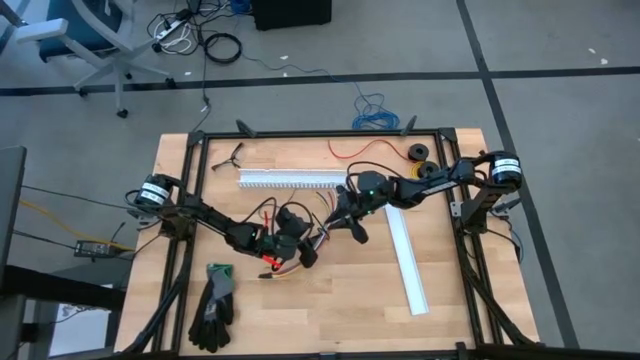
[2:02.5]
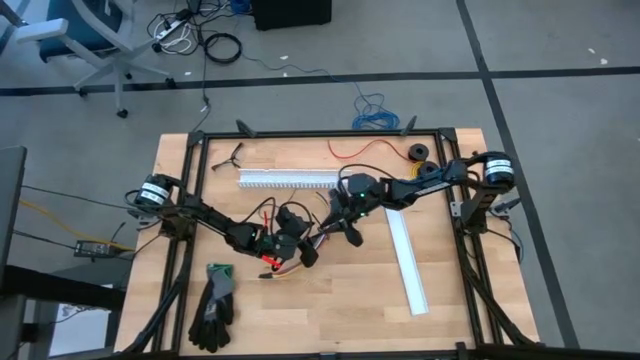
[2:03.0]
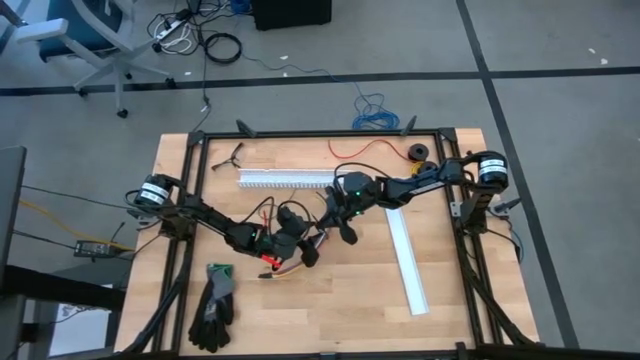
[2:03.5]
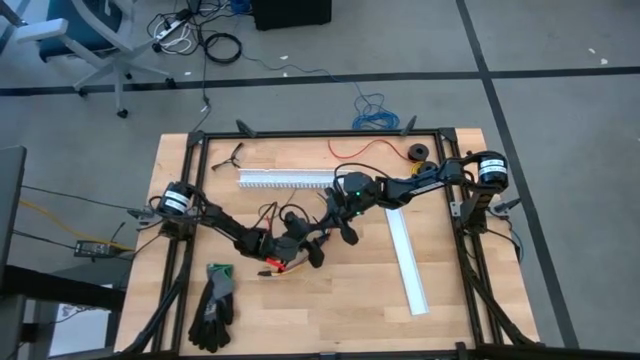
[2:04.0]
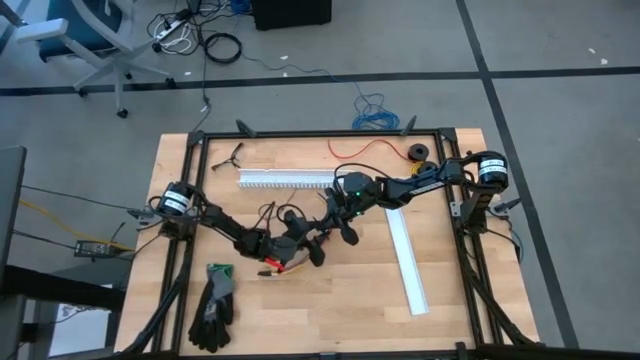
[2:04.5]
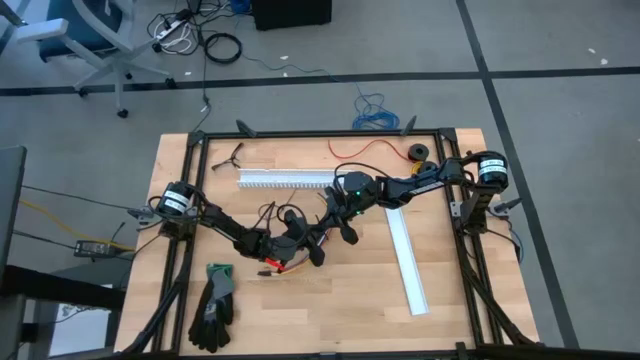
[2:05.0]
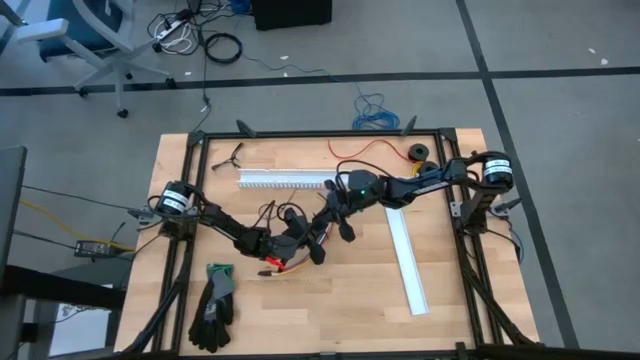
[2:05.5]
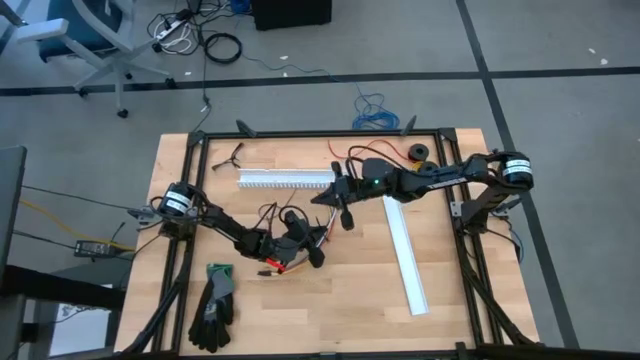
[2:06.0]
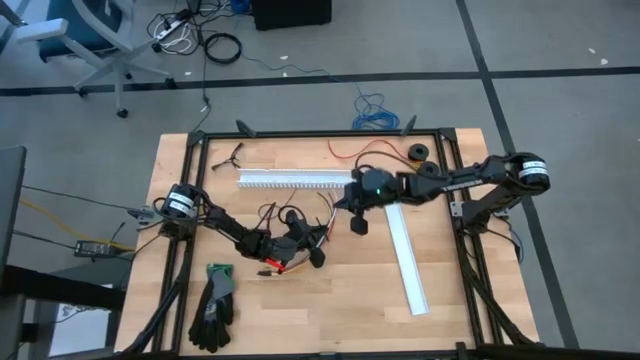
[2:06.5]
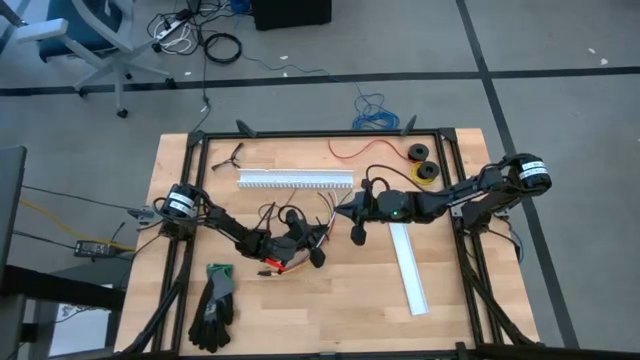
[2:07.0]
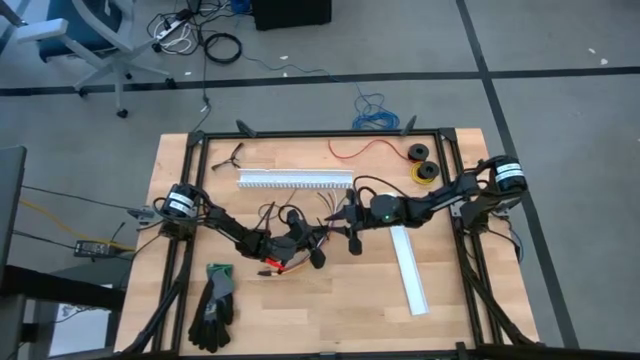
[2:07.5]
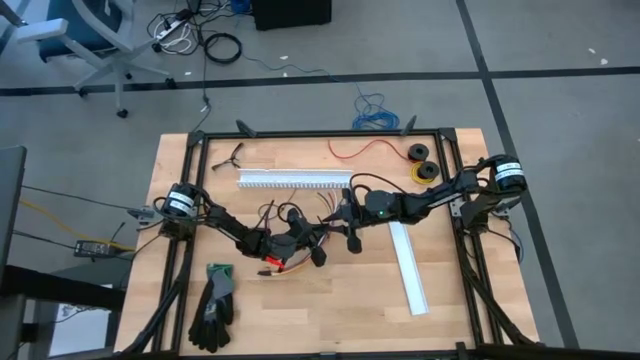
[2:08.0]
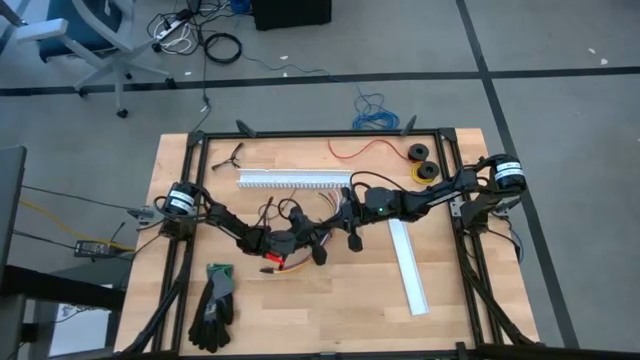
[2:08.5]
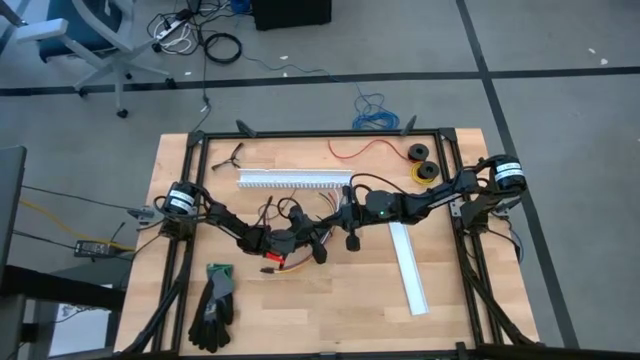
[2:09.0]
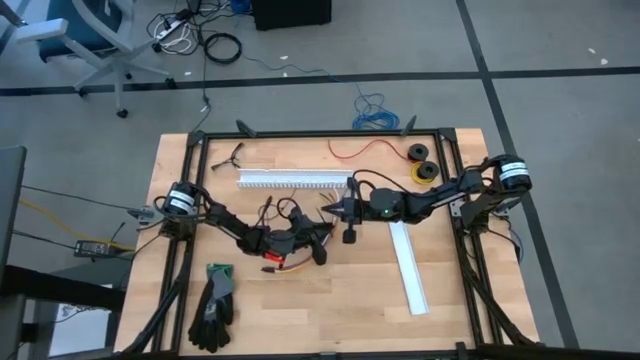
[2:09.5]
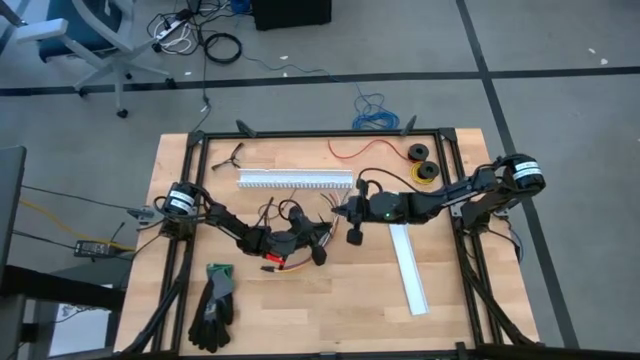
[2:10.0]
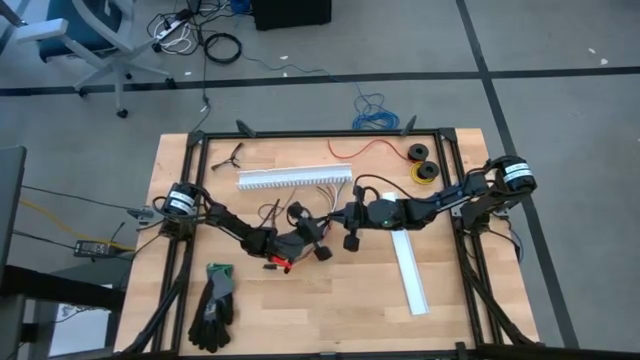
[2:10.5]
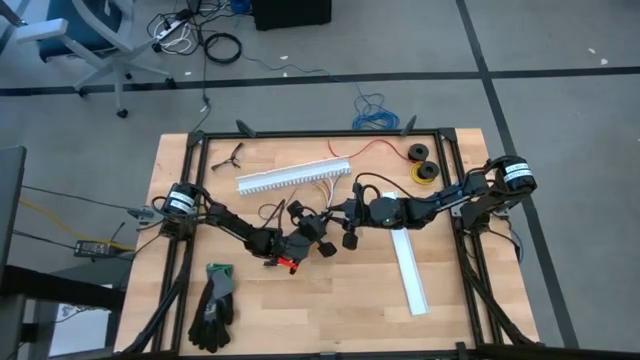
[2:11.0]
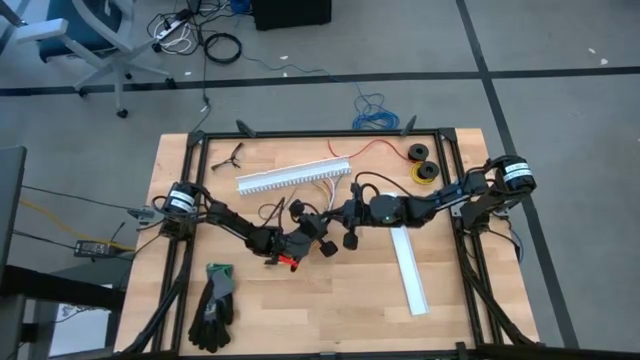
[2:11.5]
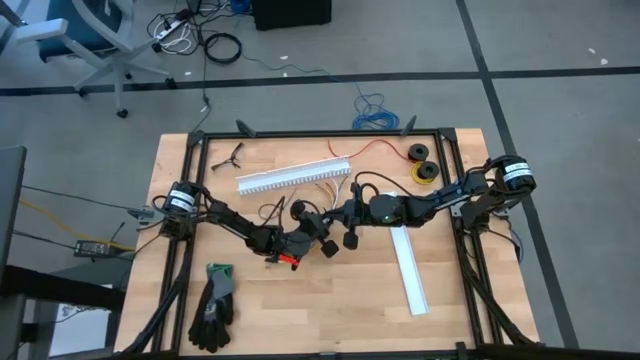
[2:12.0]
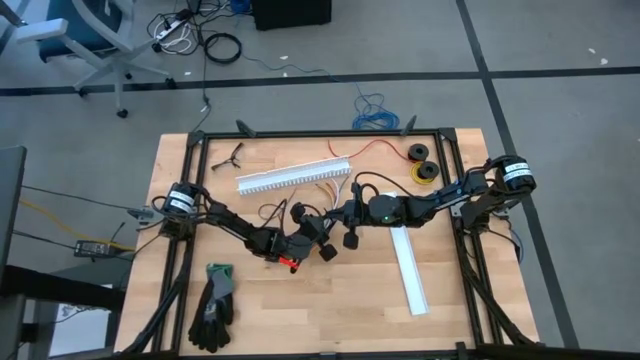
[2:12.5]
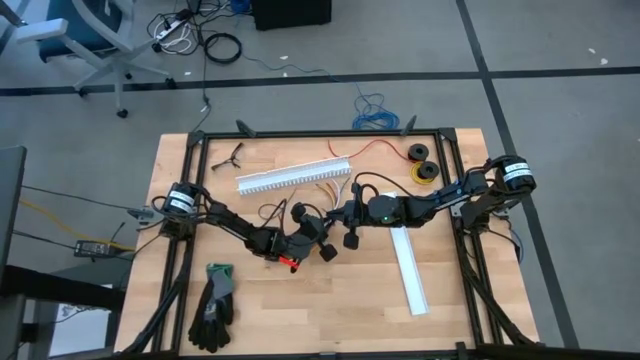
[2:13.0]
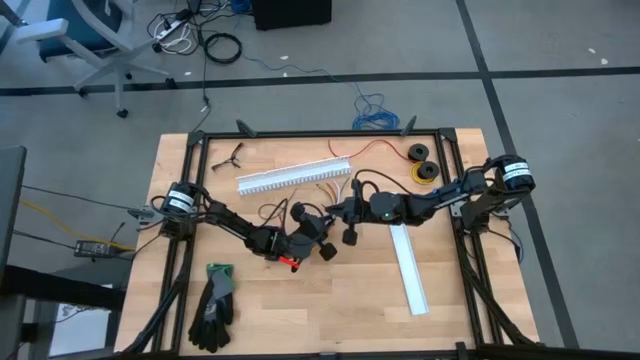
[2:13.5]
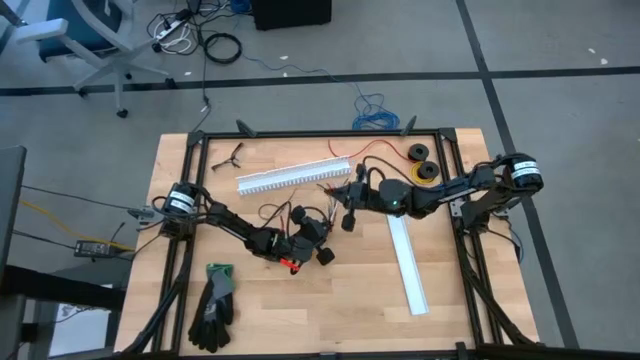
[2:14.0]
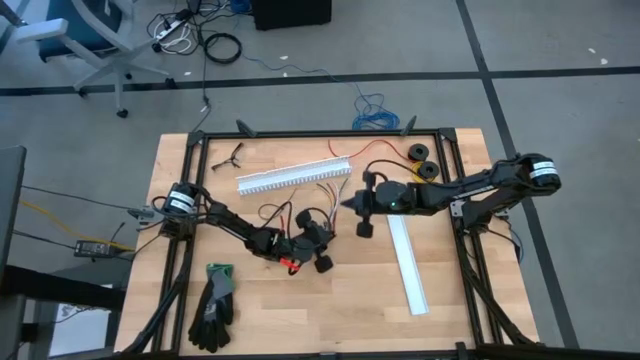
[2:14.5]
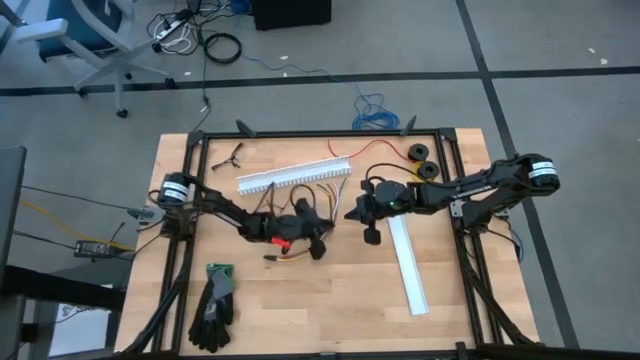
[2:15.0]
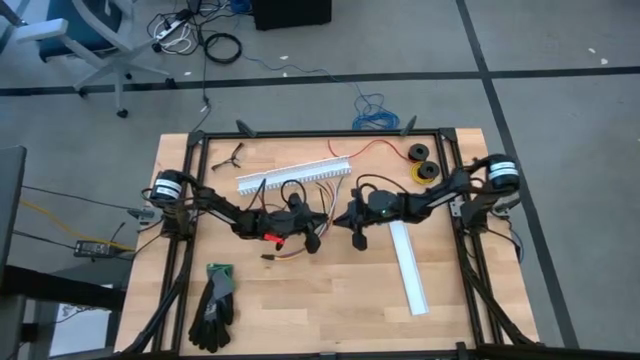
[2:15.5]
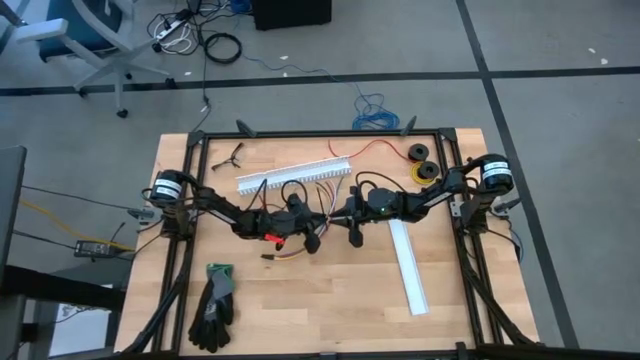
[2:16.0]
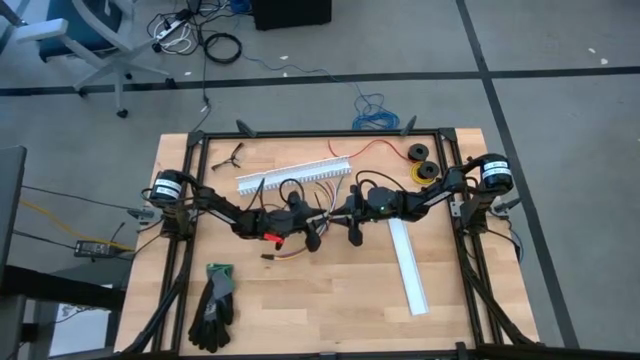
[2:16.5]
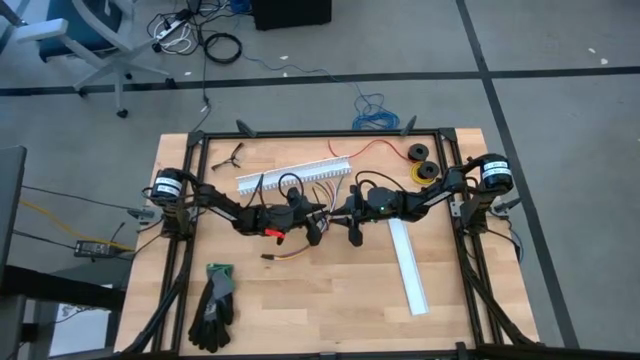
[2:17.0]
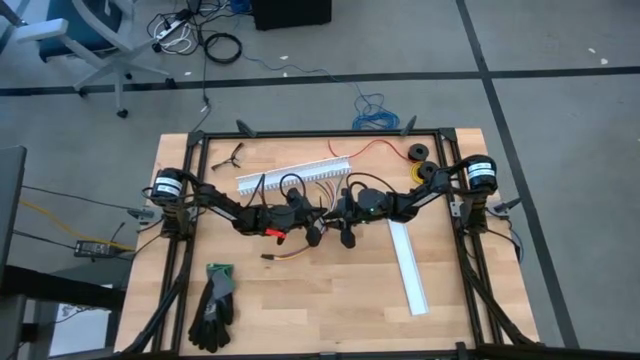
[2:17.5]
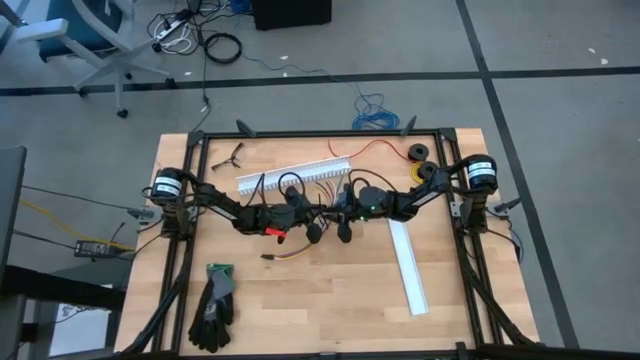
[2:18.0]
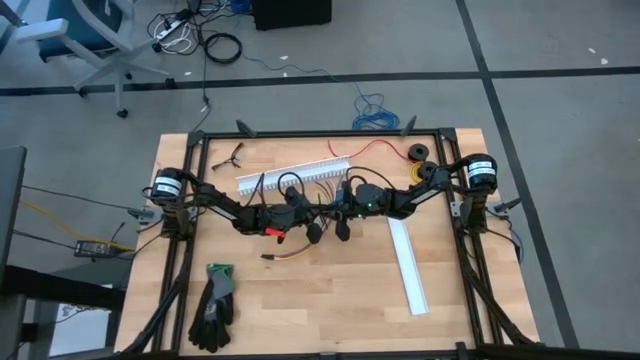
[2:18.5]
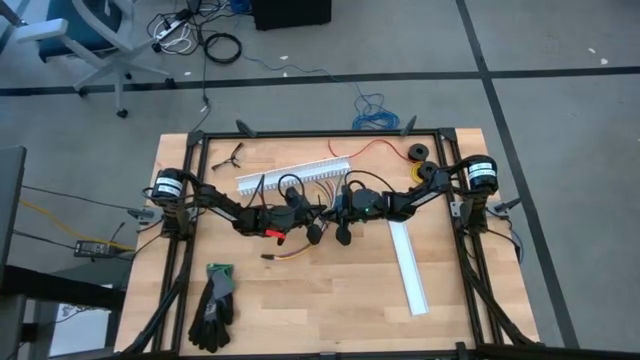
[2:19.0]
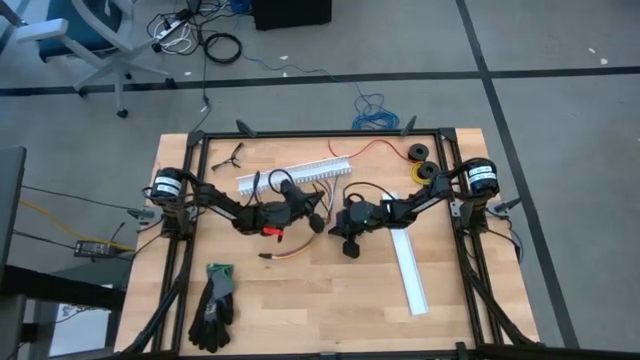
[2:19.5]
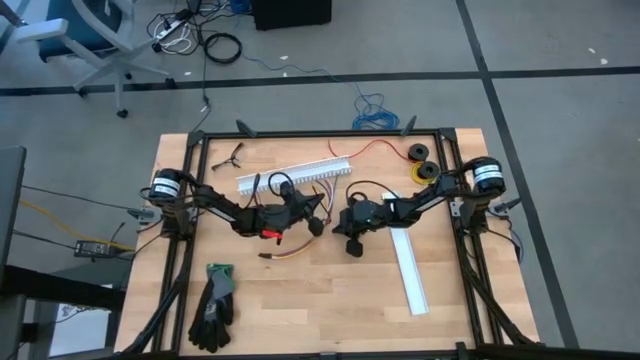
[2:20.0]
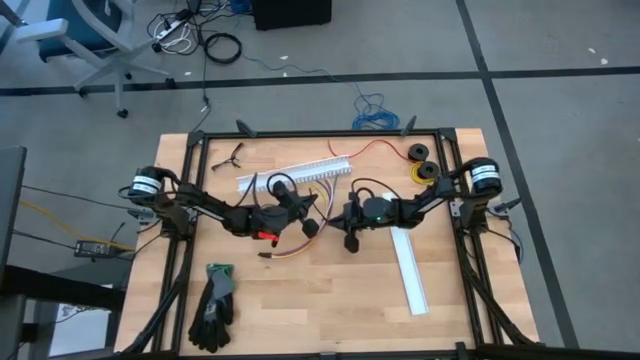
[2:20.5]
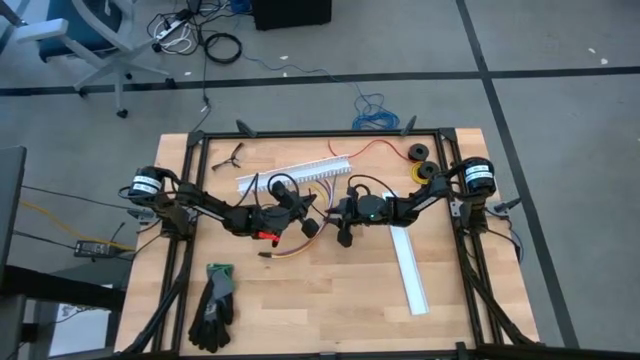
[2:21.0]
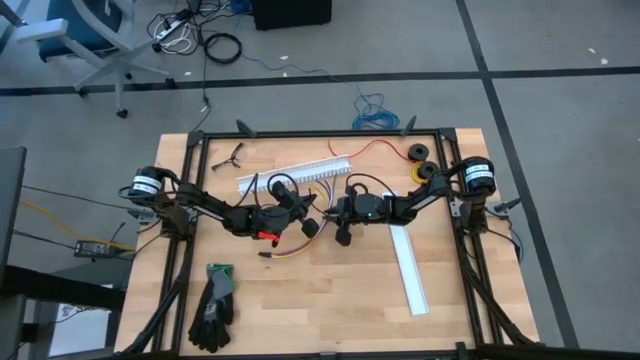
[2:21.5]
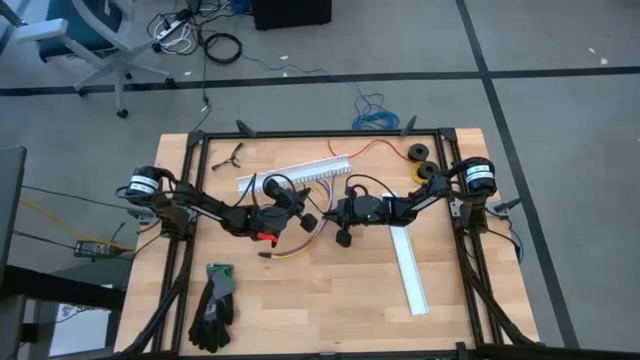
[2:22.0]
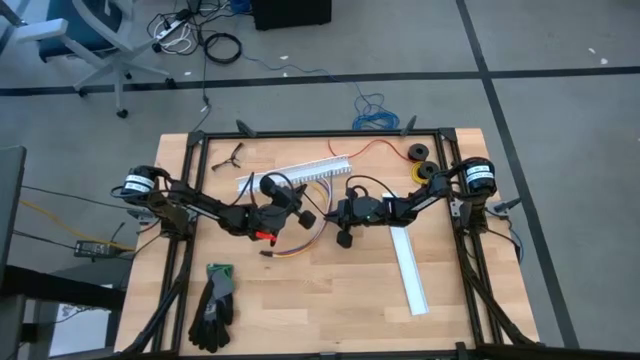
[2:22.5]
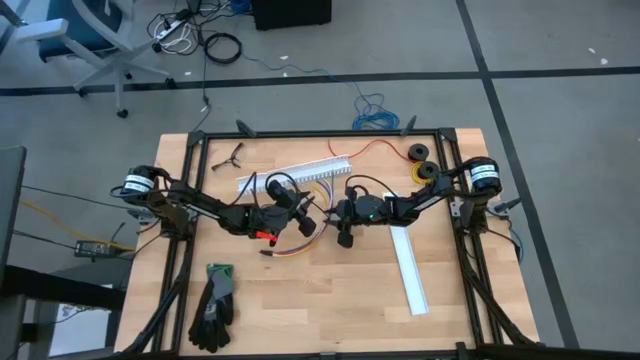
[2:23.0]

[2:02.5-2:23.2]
Task: Ziptie cables
Wrap the cable wires with black zip tie

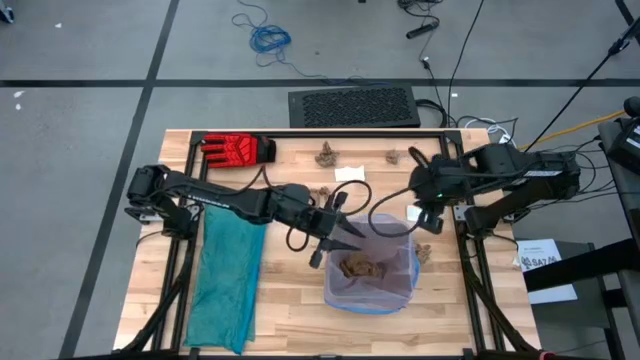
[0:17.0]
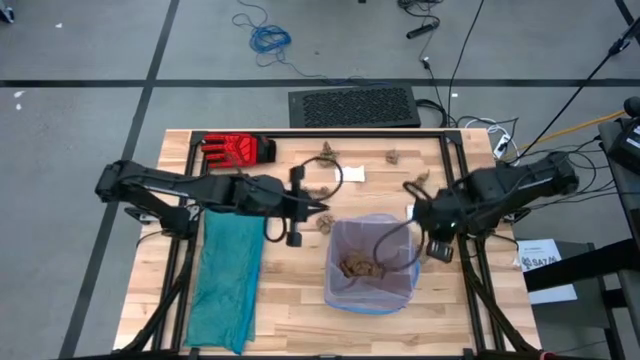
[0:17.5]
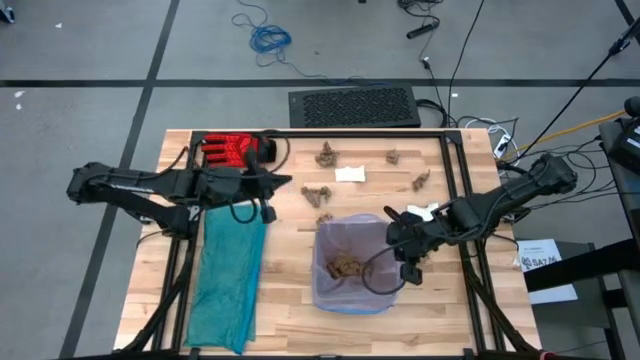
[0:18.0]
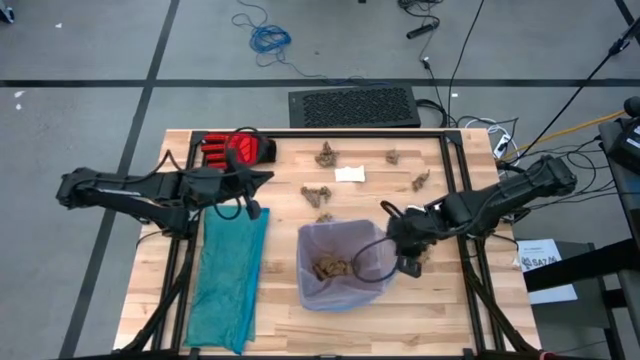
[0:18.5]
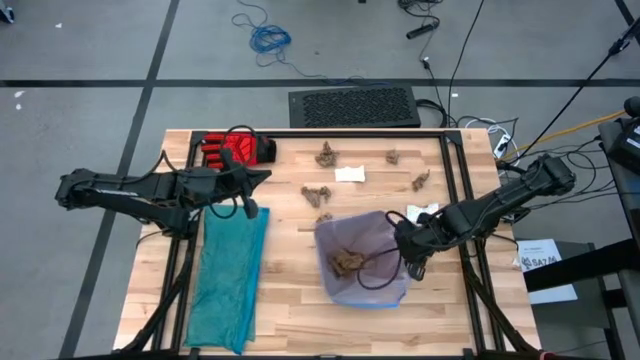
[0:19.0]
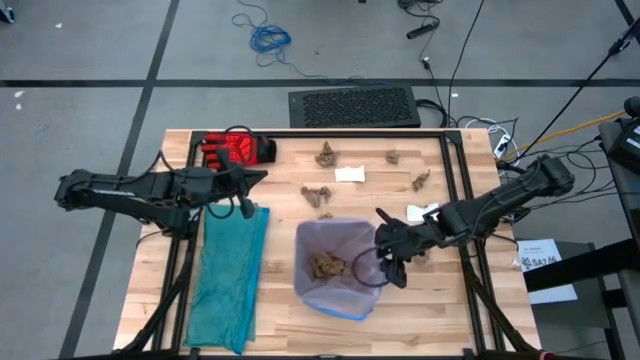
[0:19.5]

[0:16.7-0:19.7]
Task: place trash/remove bag and relplace
Adjust the black trash bin on the table
